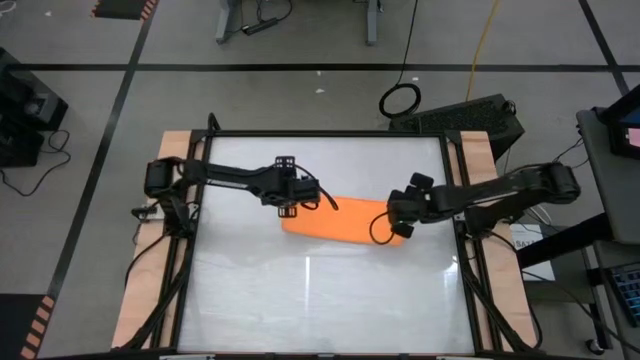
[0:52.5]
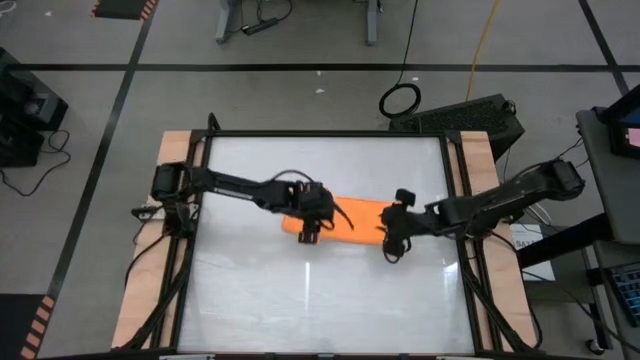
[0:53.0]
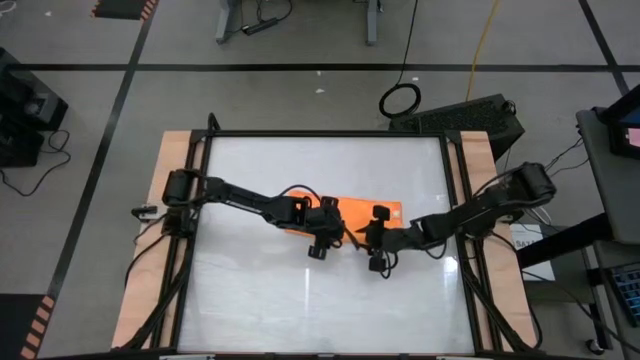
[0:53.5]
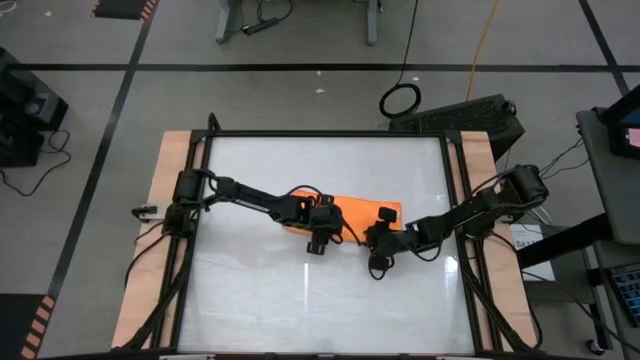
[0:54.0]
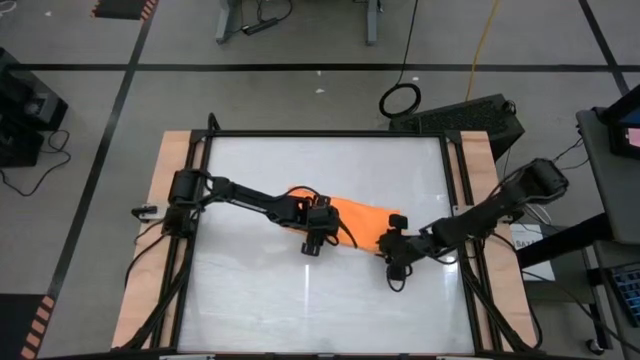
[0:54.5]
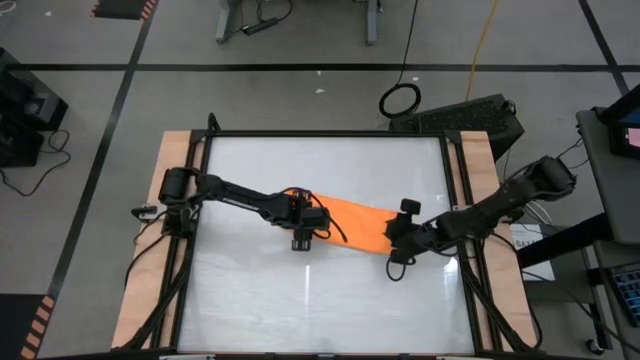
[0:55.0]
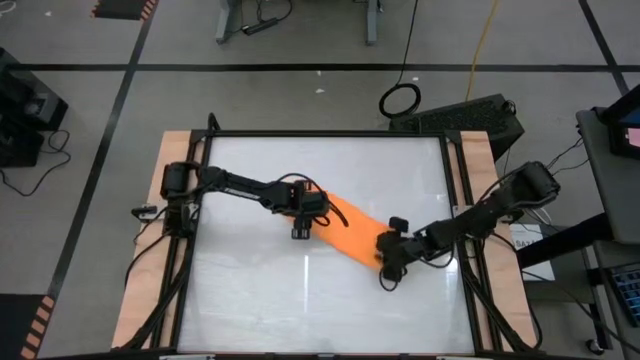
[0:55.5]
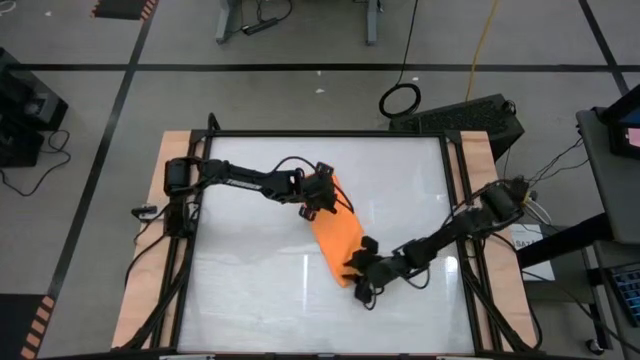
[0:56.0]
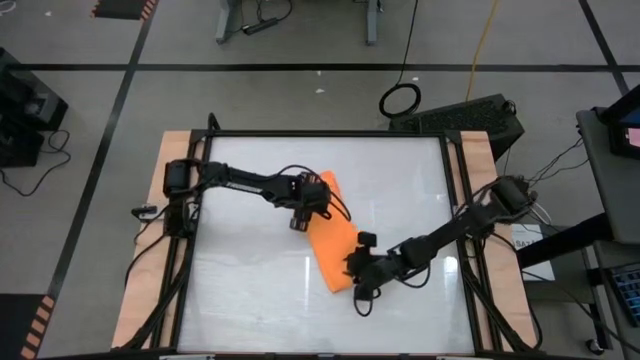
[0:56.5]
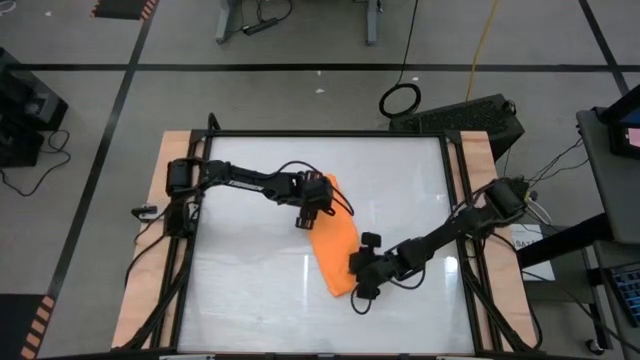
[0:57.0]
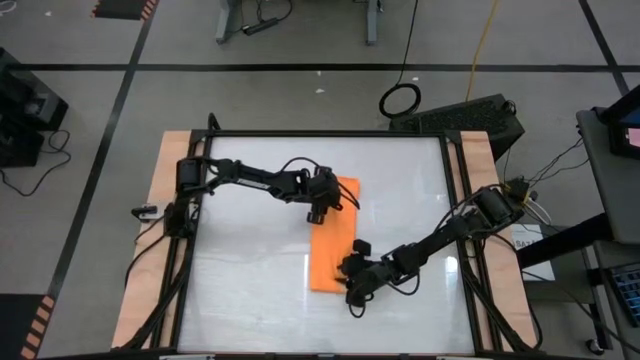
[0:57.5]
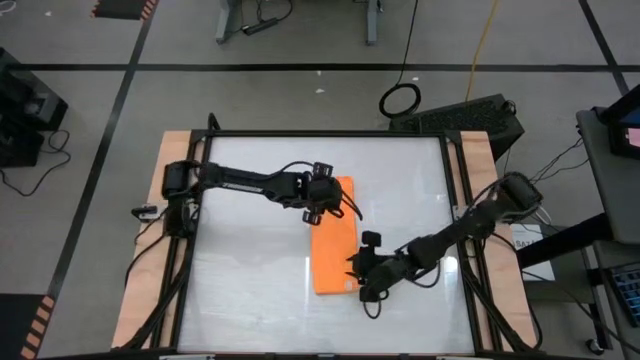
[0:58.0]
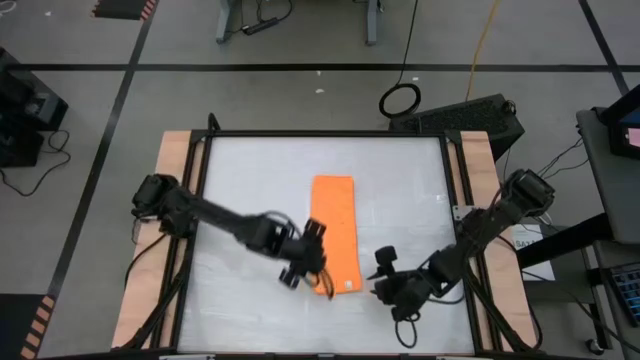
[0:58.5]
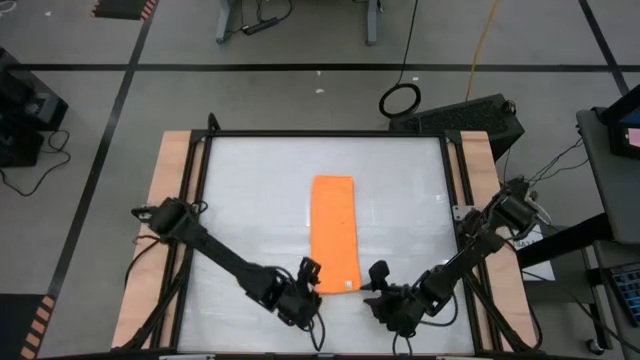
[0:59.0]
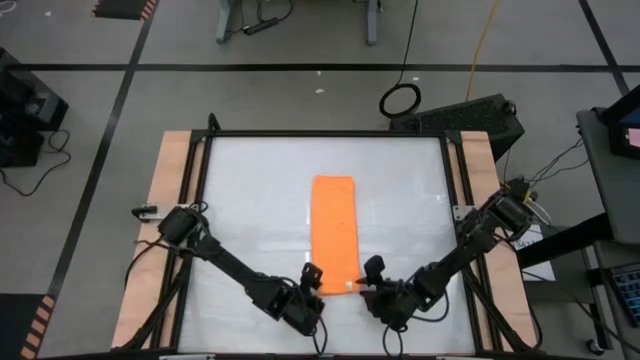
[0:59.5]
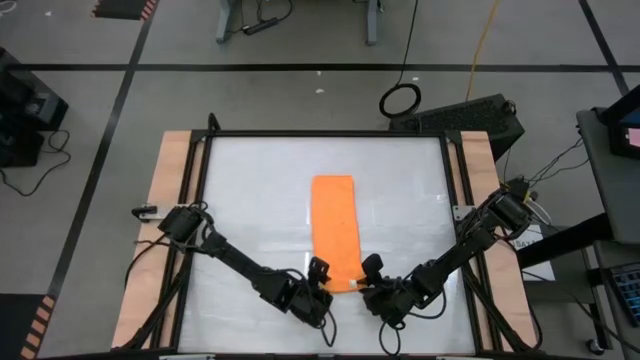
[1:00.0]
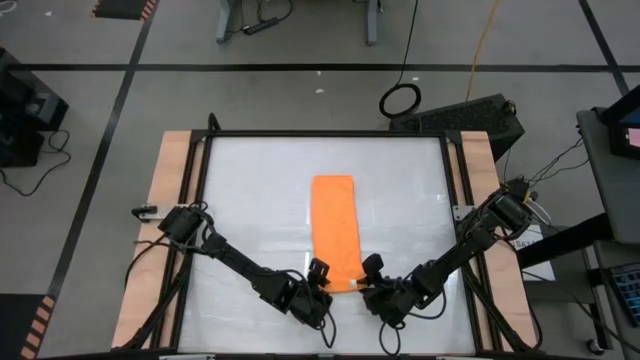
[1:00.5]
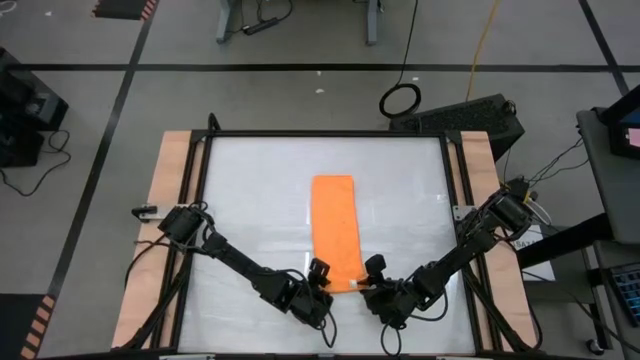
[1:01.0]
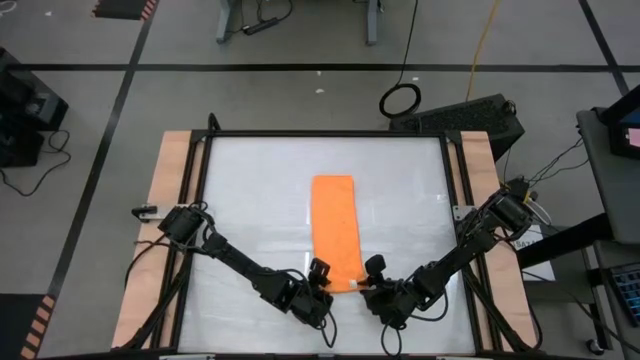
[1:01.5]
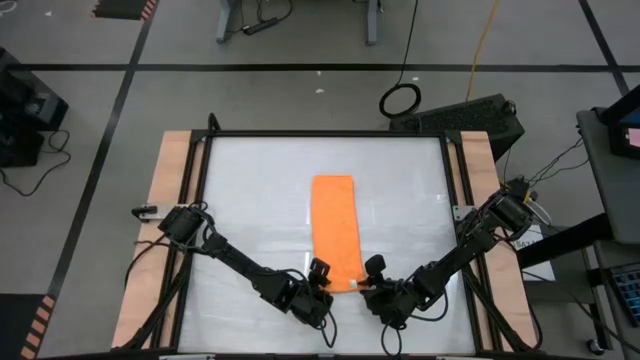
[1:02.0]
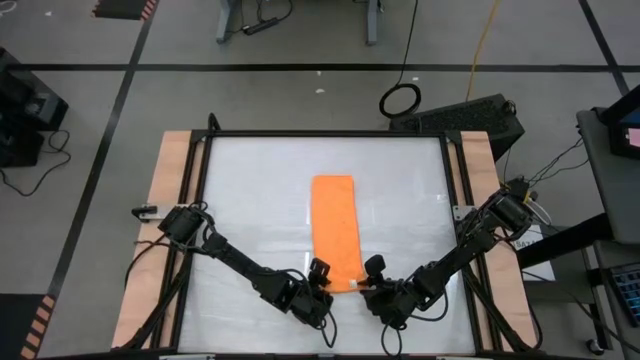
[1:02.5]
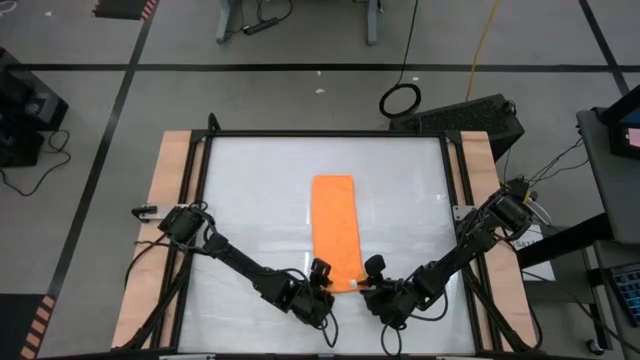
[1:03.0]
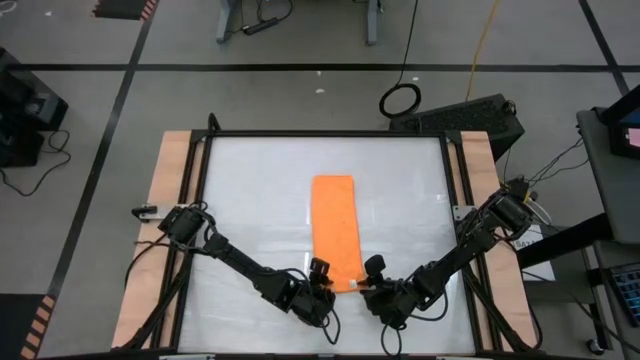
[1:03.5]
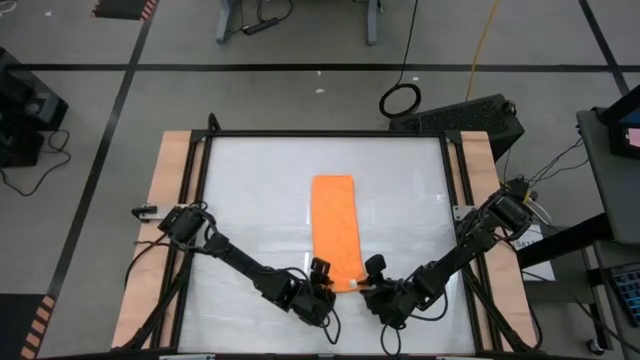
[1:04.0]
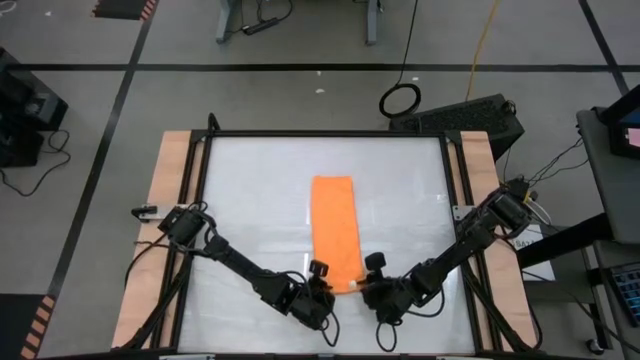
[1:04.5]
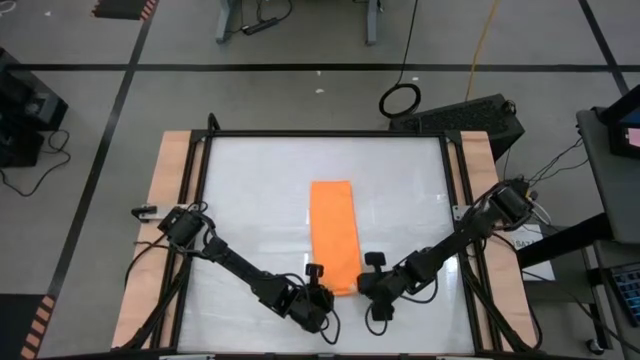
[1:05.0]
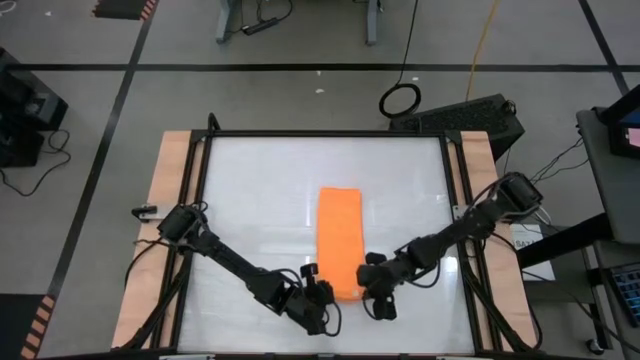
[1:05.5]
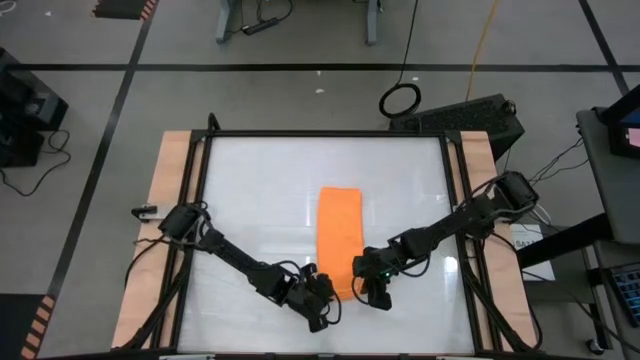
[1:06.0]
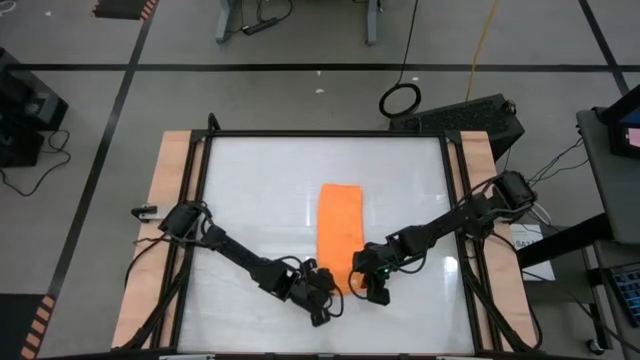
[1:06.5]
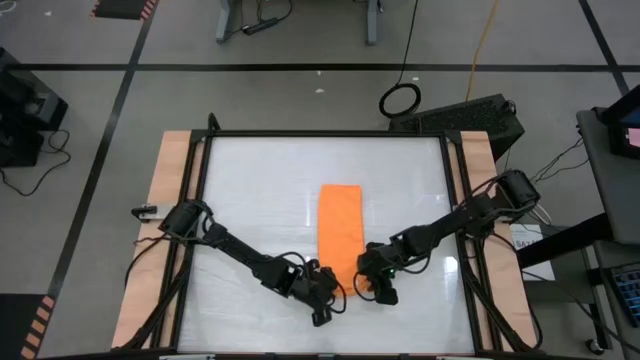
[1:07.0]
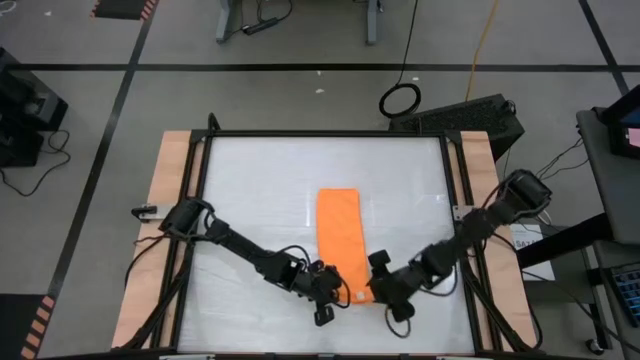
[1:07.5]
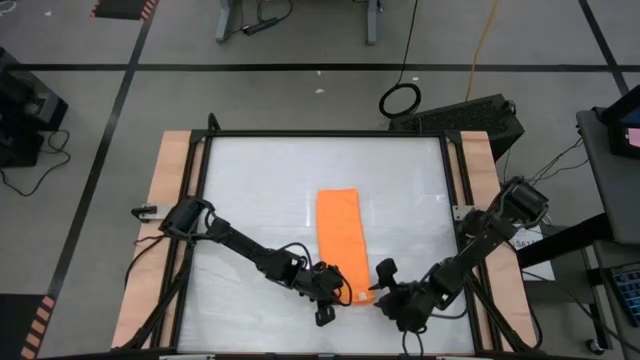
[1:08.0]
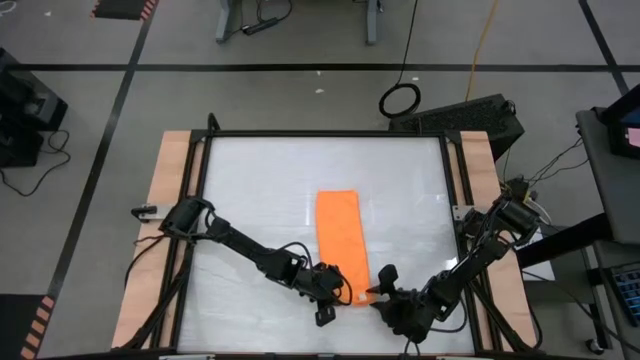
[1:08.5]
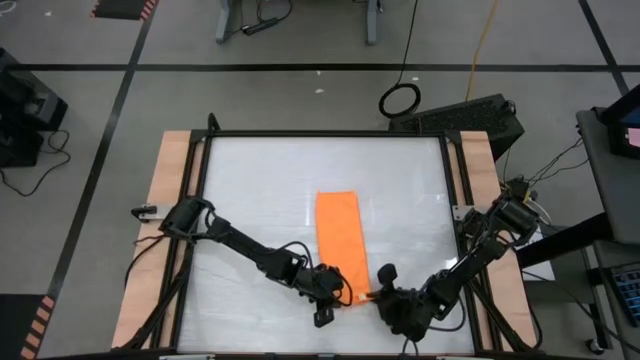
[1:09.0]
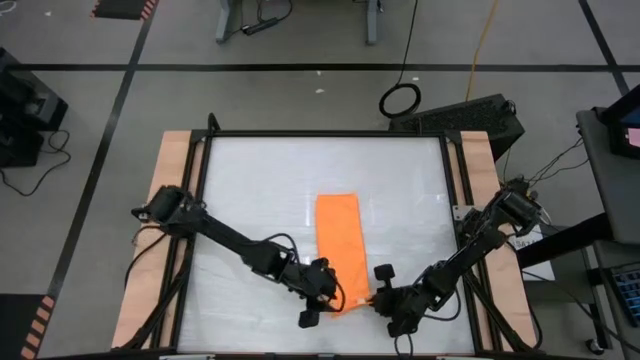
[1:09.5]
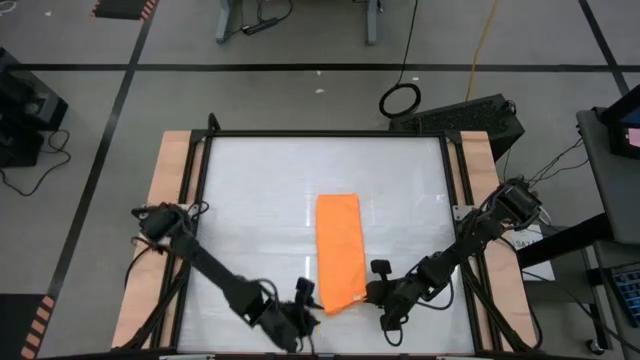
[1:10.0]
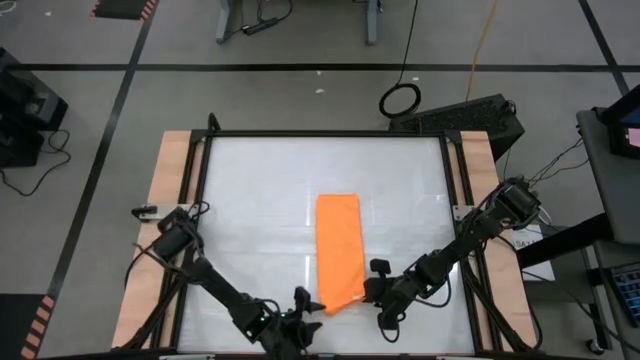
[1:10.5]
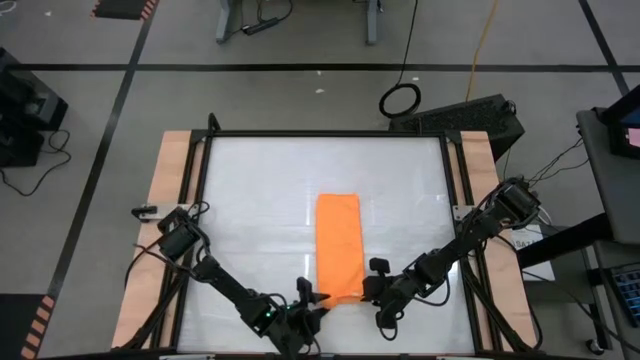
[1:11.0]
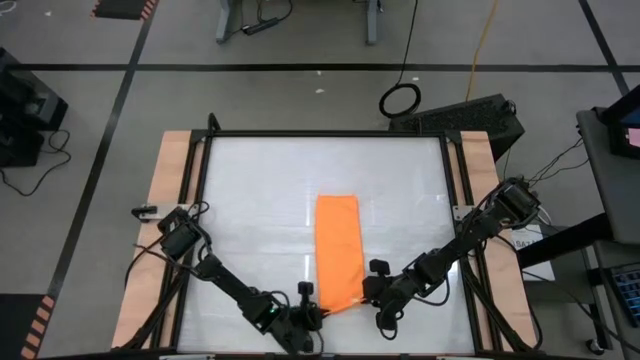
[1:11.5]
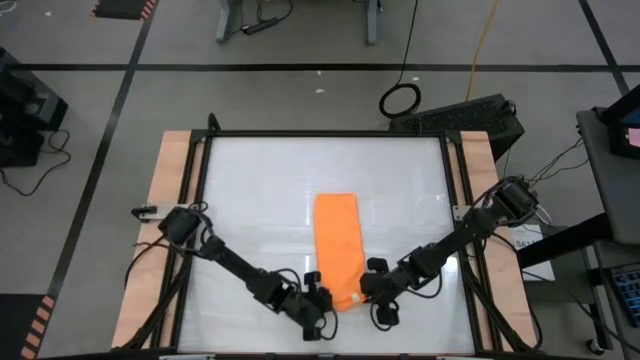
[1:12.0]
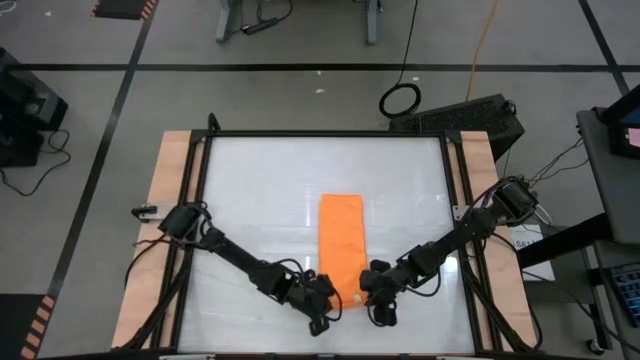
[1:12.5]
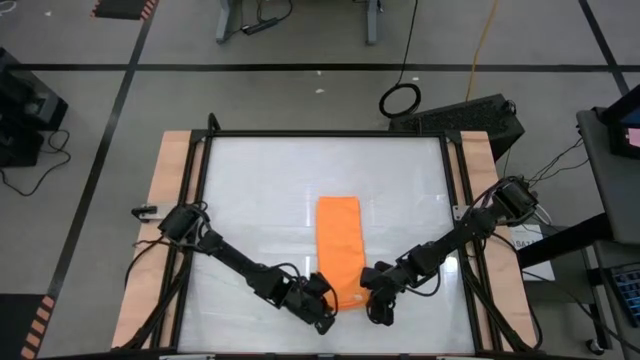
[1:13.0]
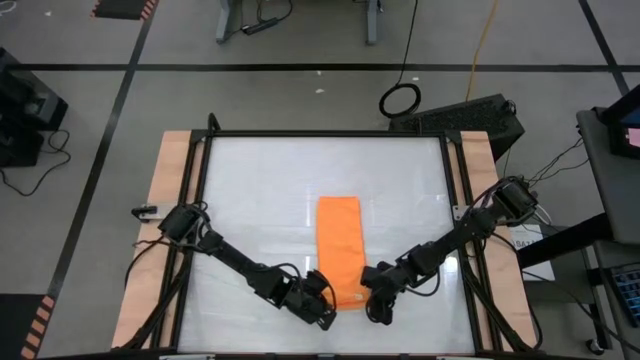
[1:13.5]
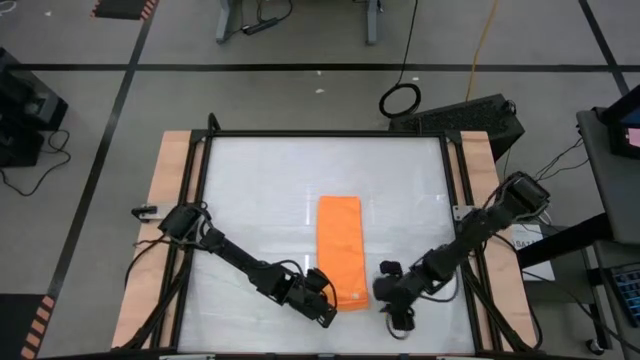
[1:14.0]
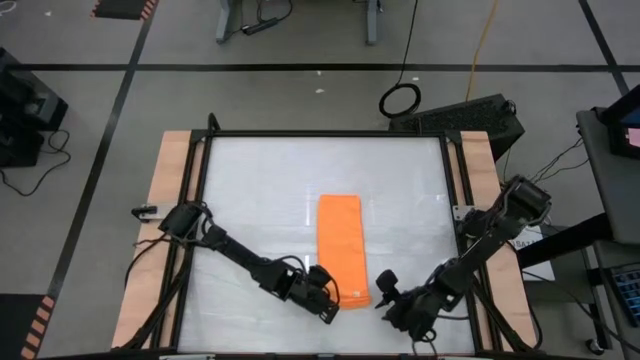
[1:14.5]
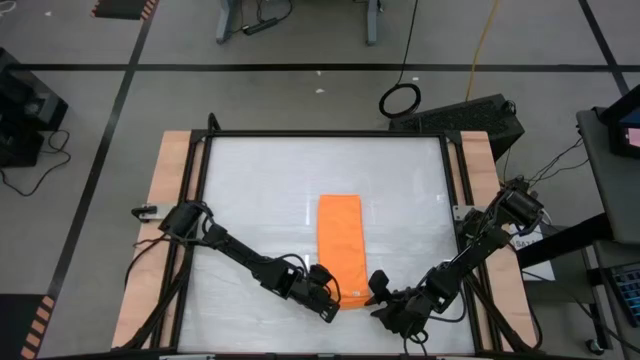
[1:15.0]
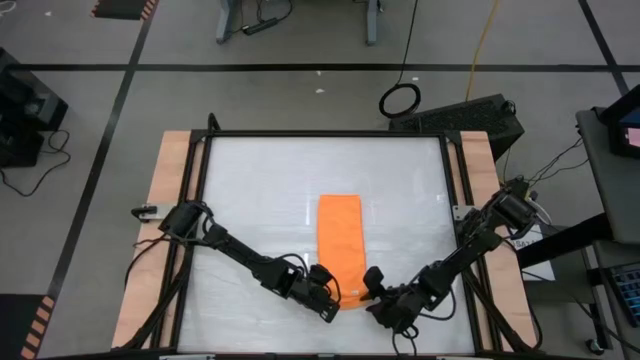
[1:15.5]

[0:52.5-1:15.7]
Task: Roll towel
Roll the towel
